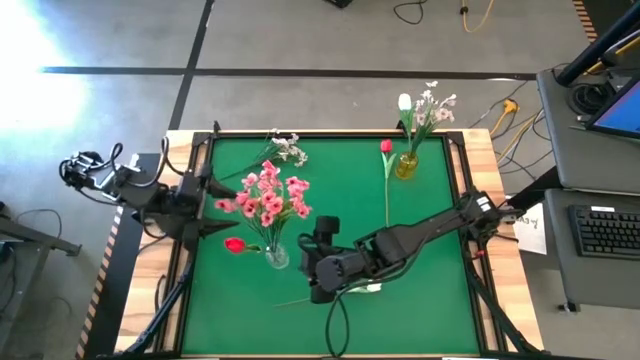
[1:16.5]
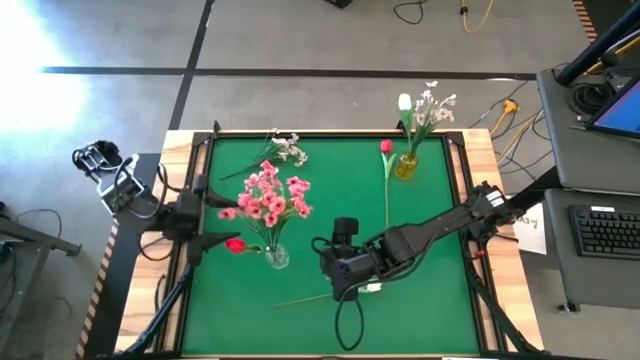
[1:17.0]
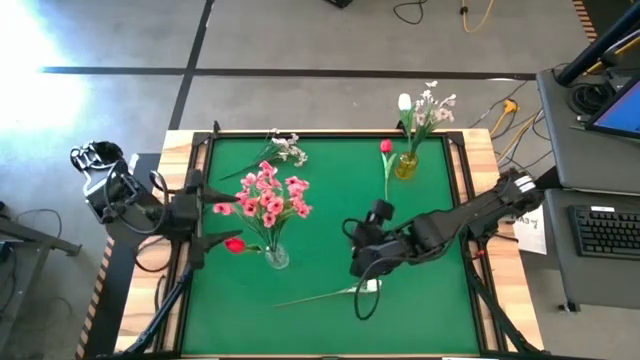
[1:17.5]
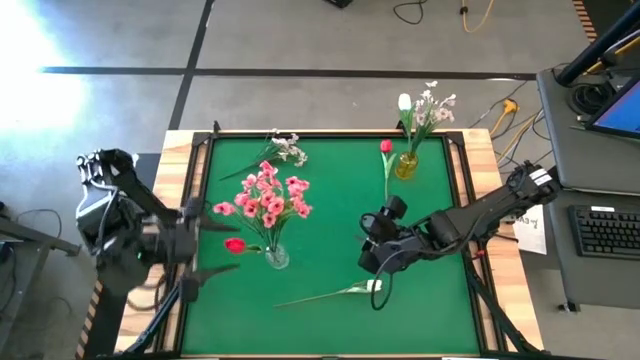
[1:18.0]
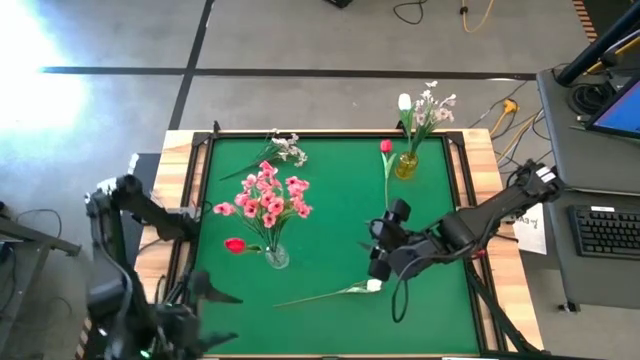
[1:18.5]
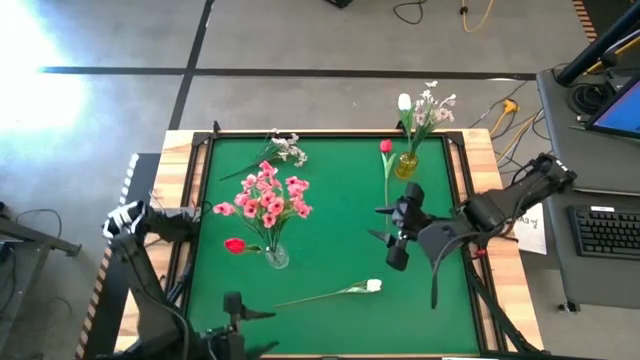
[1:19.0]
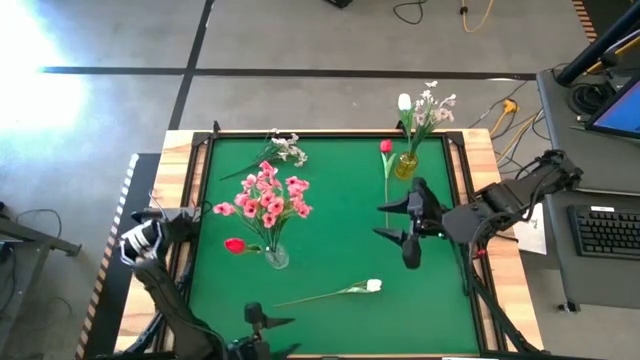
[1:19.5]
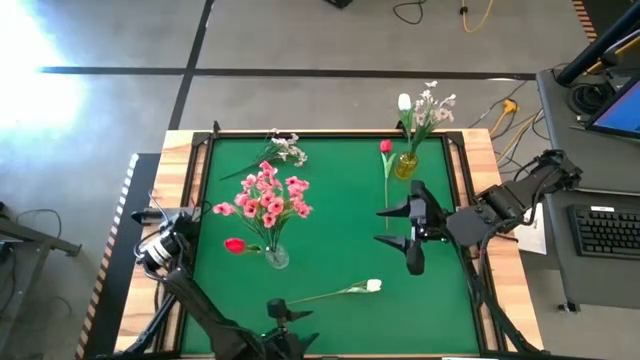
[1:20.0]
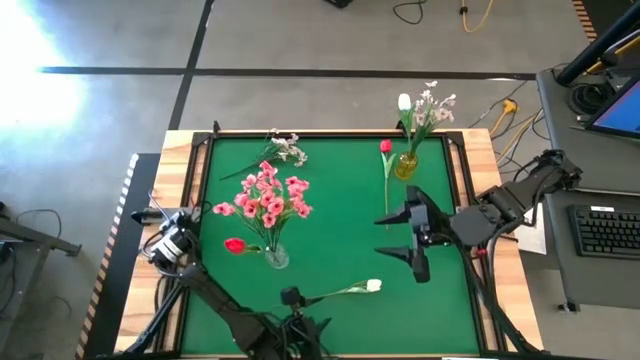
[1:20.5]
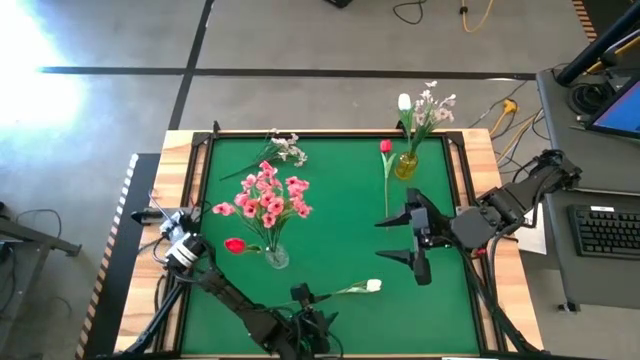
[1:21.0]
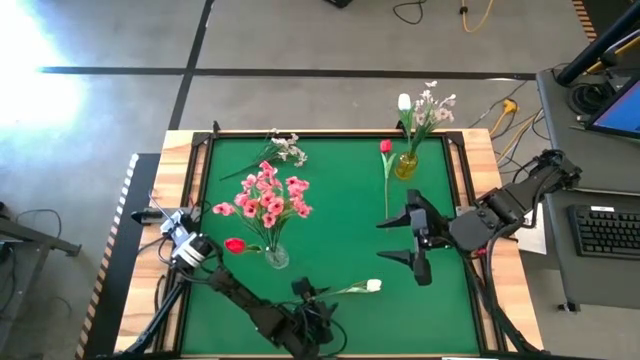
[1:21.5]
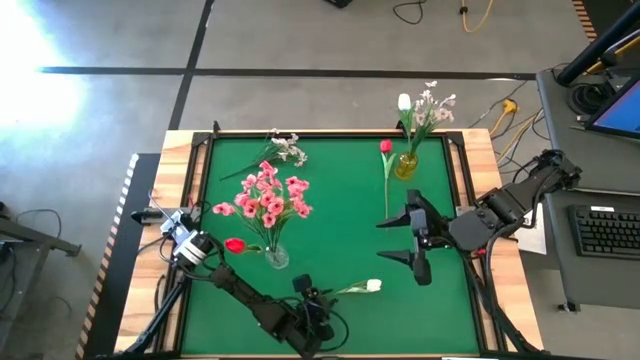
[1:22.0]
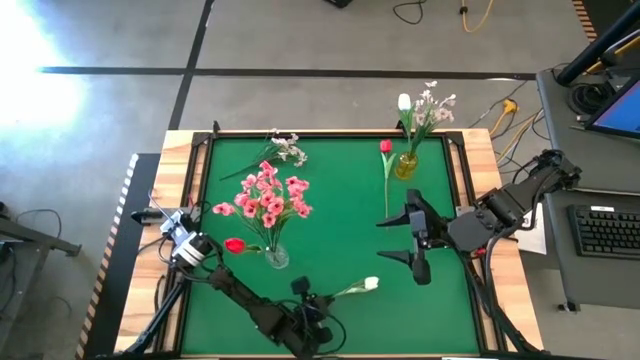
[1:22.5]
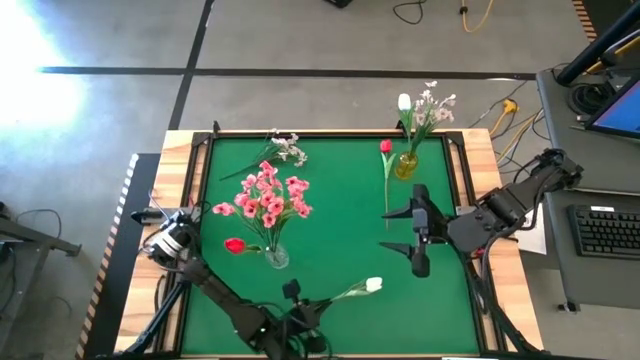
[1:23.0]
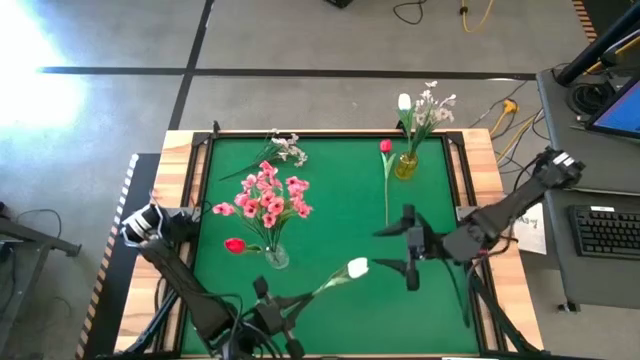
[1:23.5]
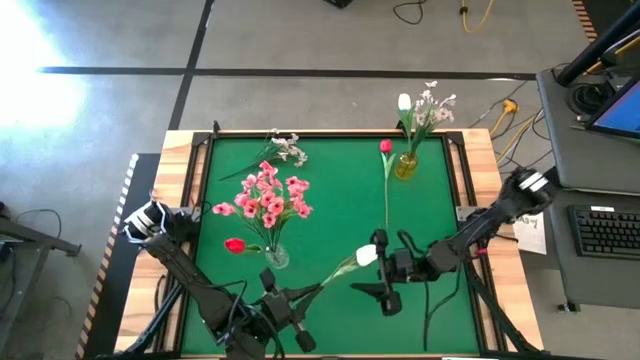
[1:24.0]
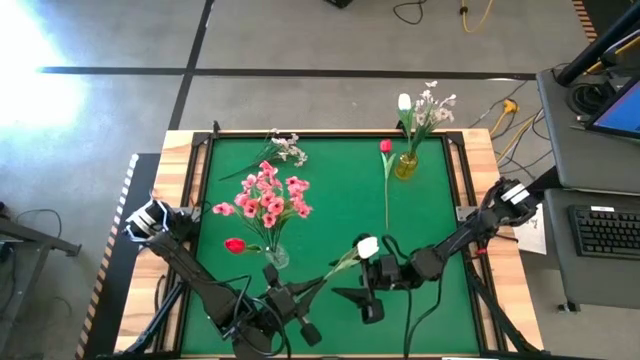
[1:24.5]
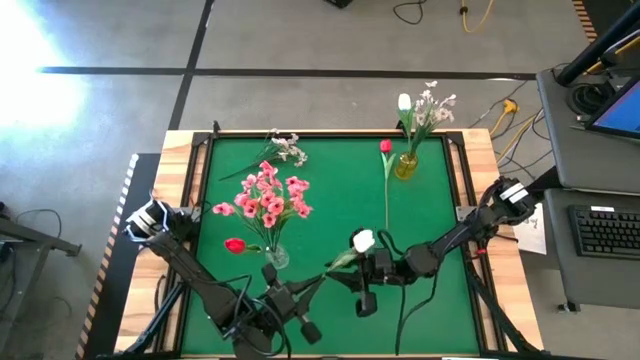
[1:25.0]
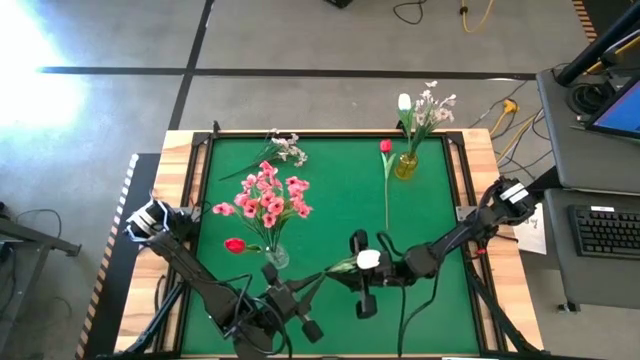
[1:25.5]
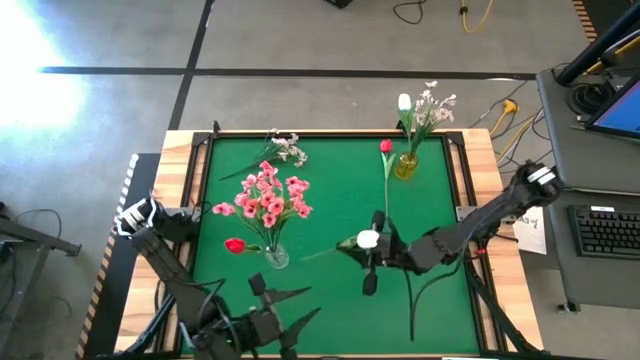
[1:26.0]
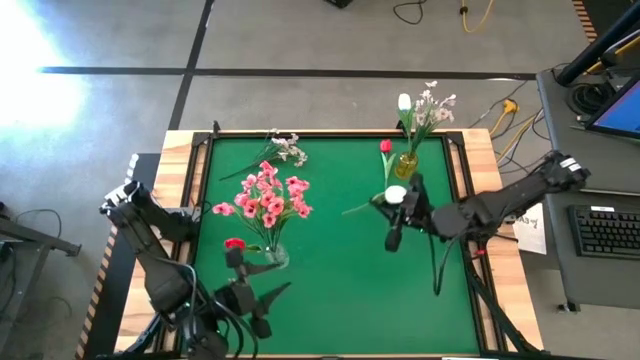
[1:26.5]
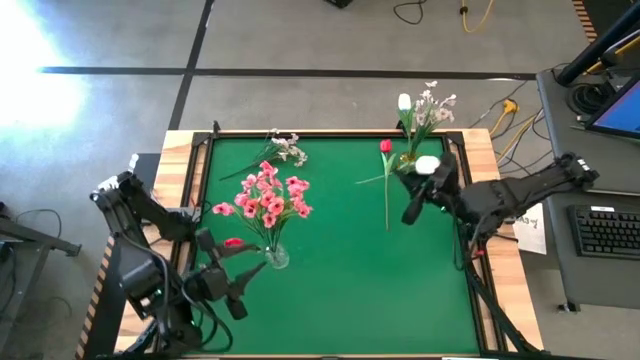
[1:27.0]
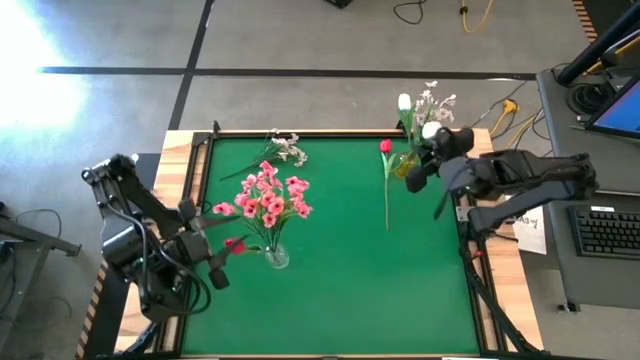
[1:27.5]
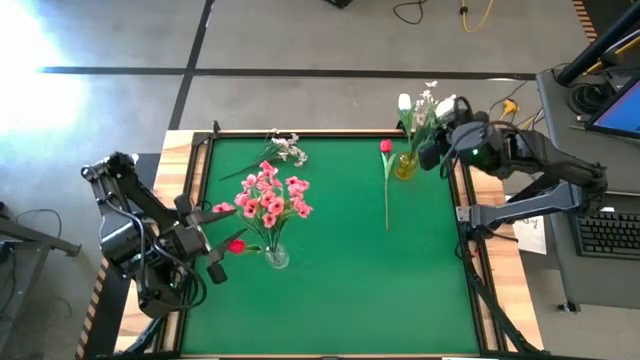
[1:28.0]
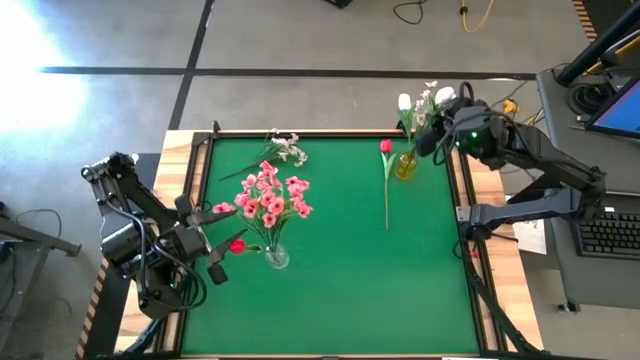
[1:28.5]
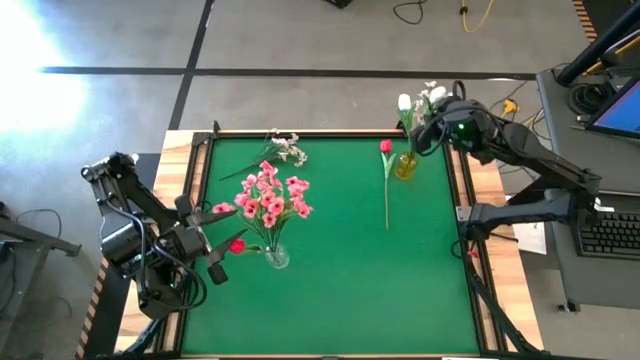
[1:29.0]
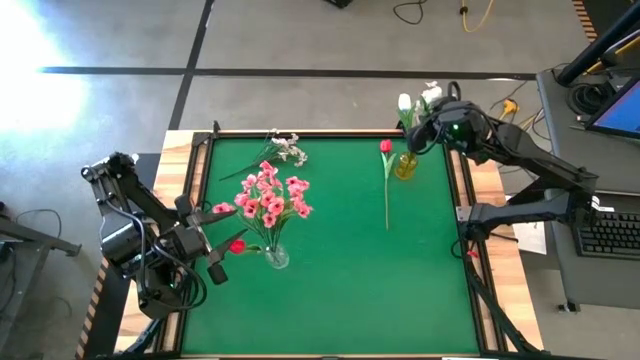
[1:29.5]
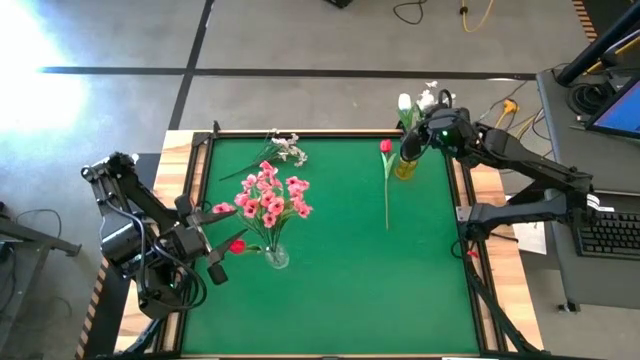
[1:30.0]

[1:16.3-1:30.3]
Task: Sort flowers into vase by color
Put the white flowers into the yellow vase

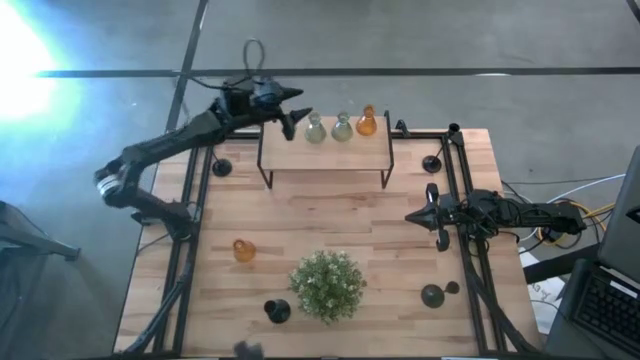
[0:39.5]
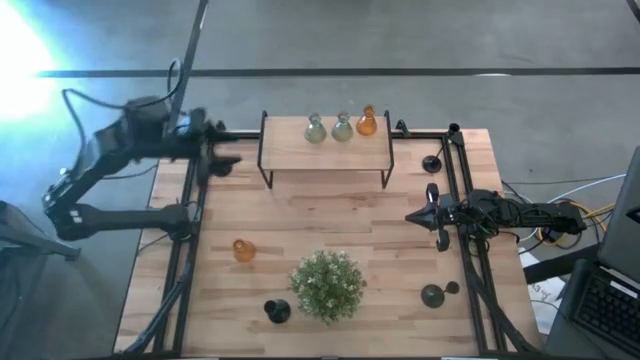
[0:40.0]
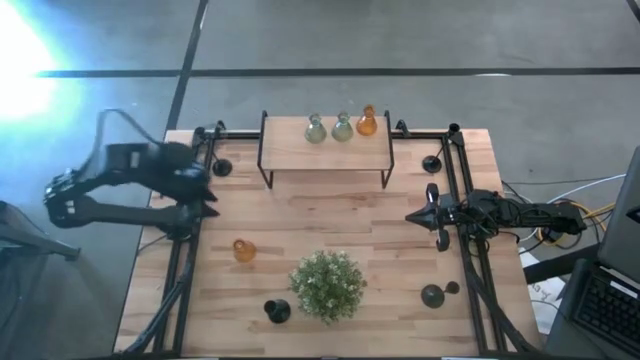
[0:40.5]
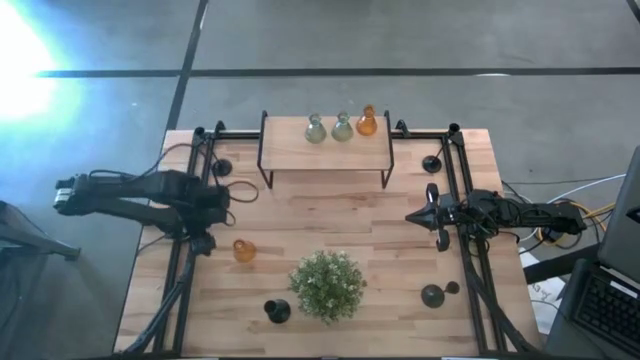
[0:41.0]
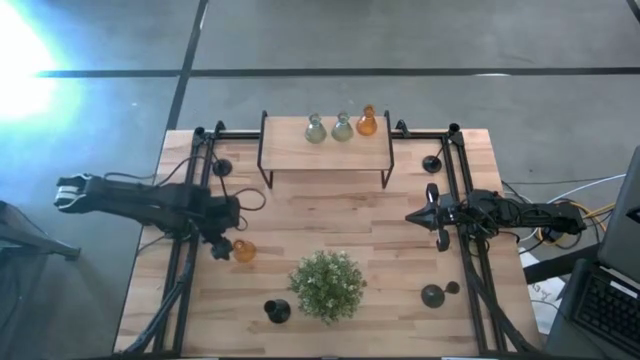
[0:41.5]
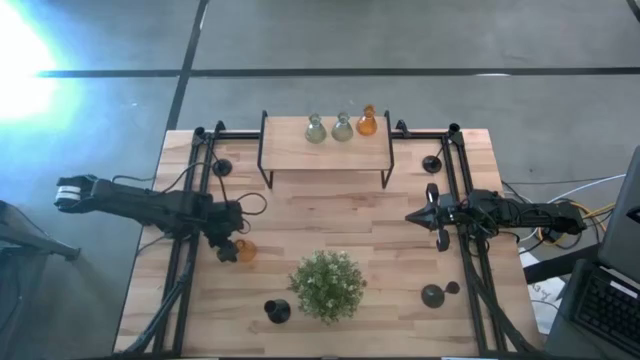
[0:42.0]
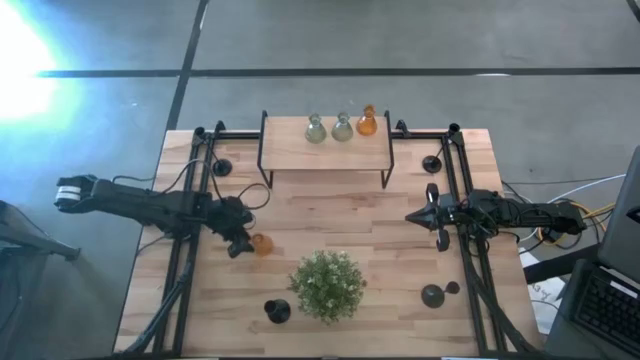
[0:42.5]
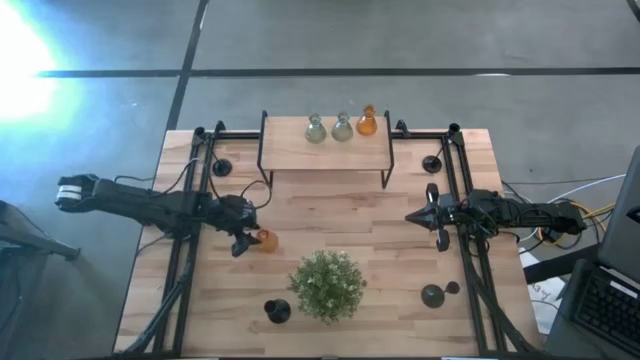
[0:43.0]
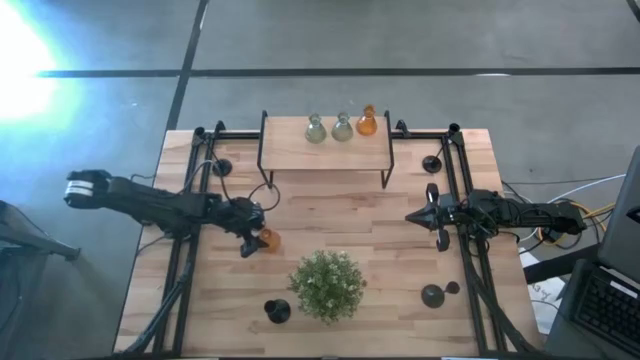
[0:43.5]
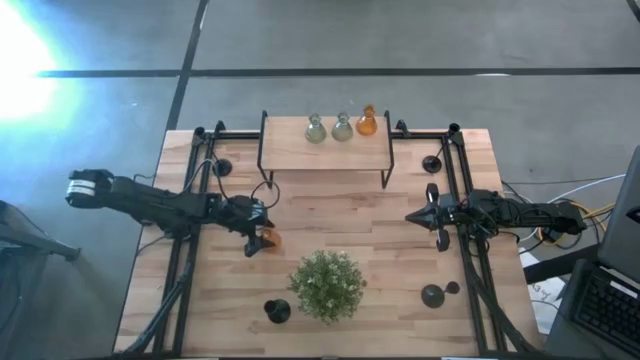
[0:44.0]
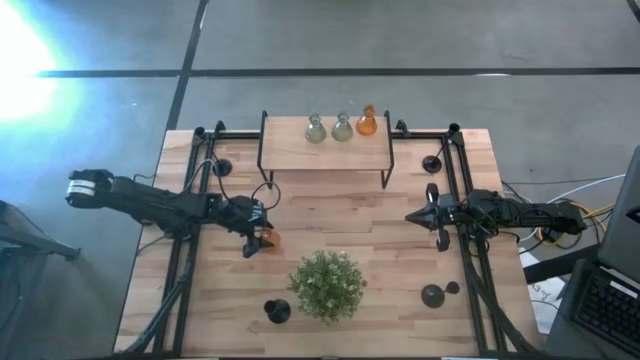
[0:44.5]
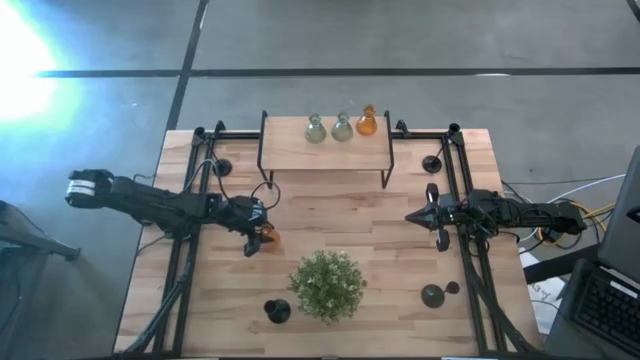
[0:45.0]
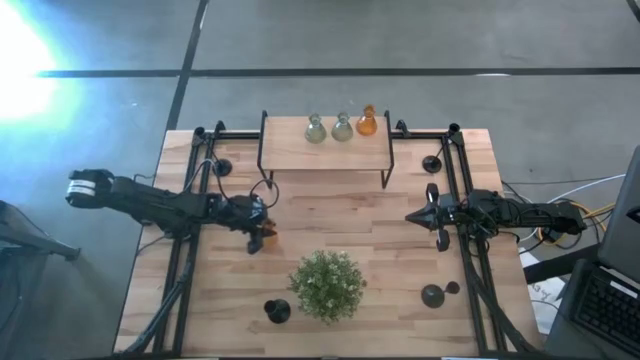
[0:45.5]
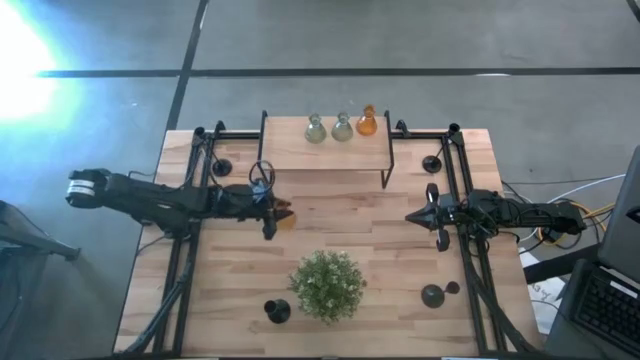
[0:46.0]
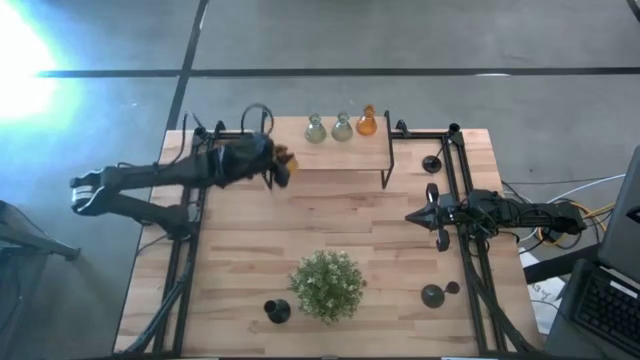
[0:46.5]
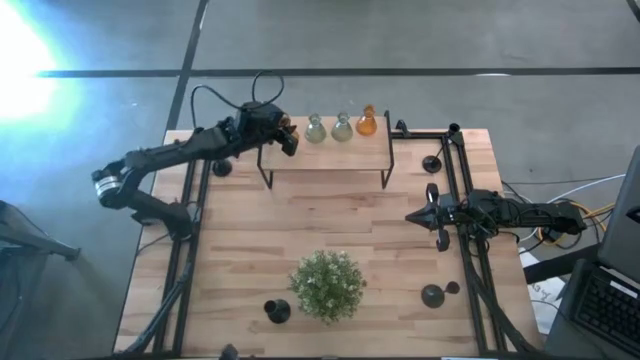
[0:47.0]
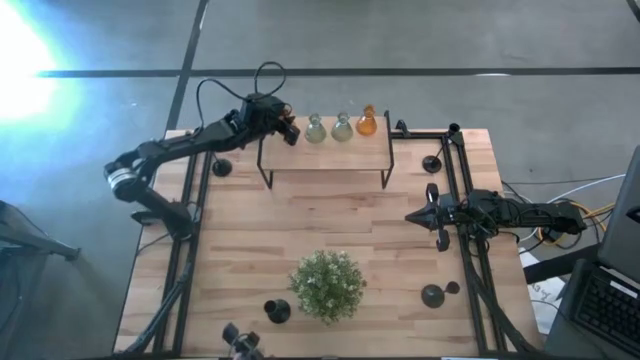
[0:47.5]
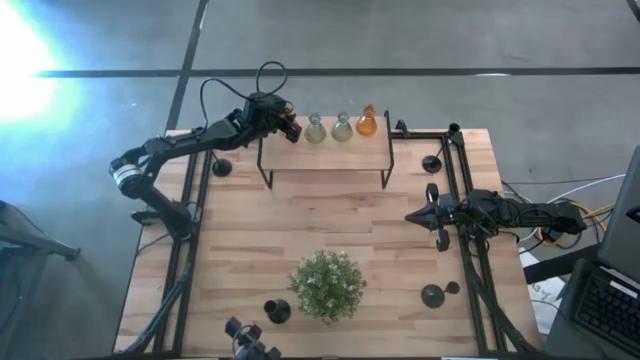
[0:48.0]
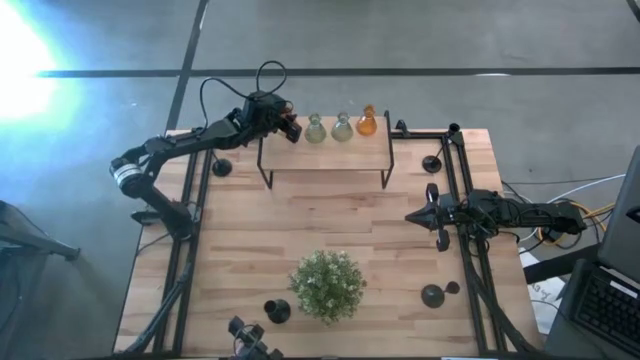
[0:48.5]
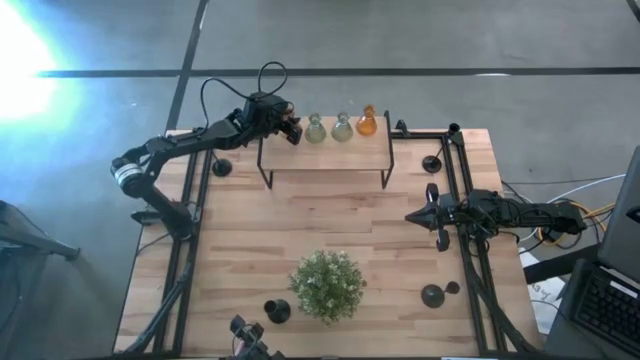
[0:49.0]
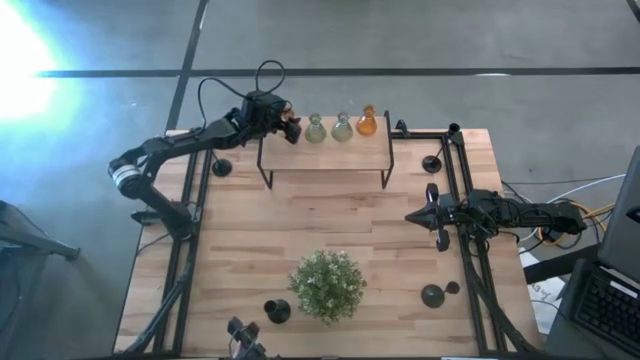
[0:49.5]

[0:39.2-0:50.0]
Task: Pick & Place candle stick holders
Put the orange glass candle holder on the shelf aligned with the other glass candle holder
